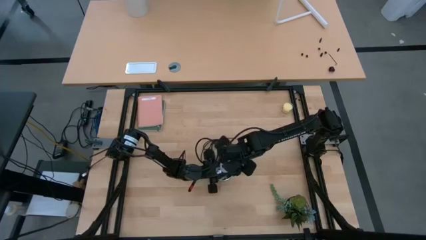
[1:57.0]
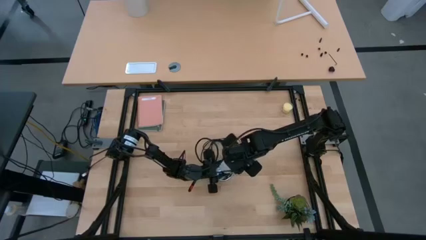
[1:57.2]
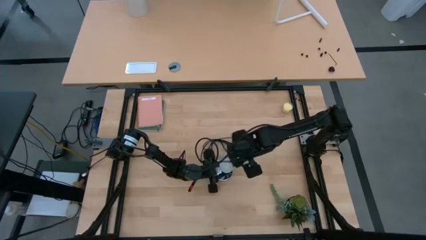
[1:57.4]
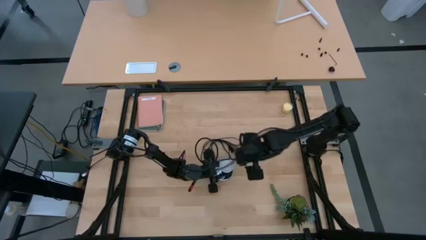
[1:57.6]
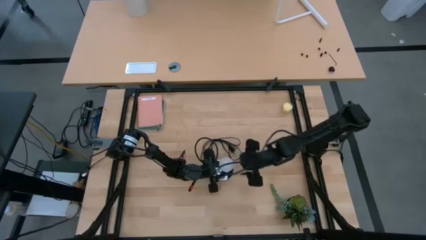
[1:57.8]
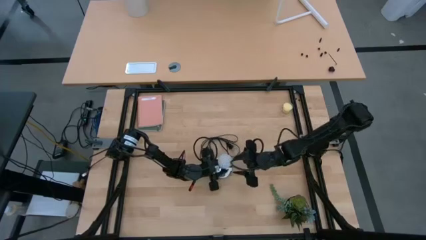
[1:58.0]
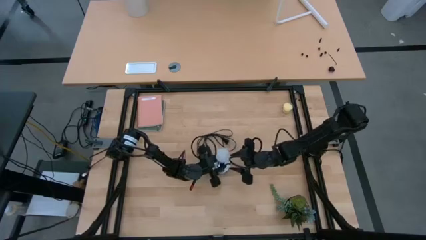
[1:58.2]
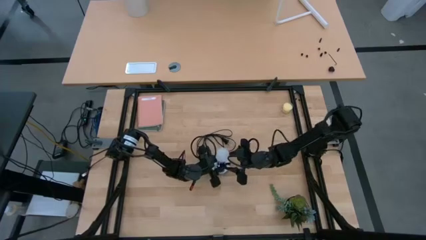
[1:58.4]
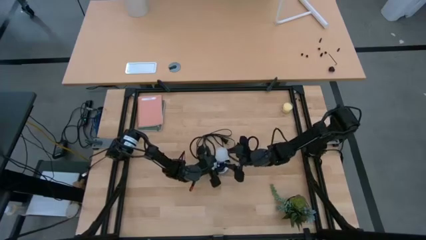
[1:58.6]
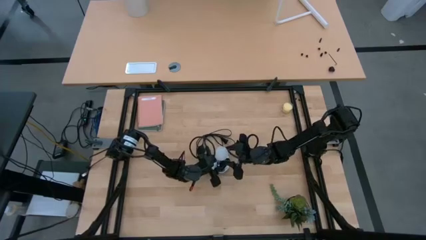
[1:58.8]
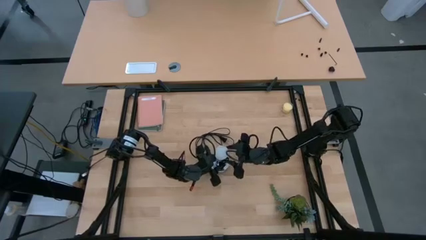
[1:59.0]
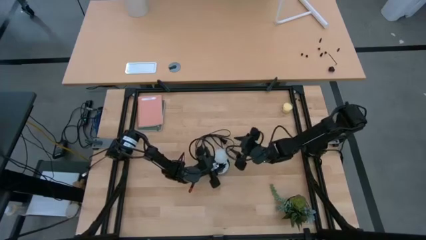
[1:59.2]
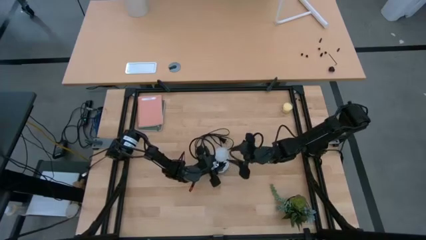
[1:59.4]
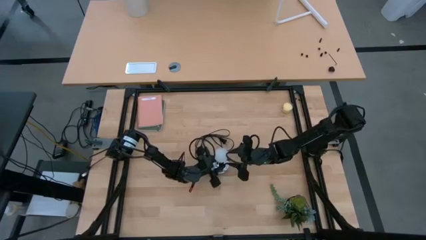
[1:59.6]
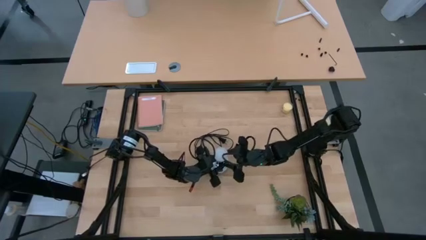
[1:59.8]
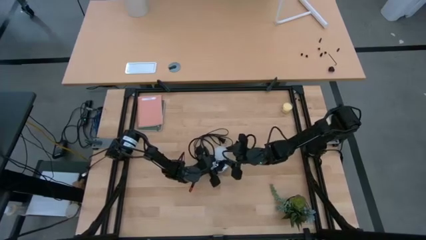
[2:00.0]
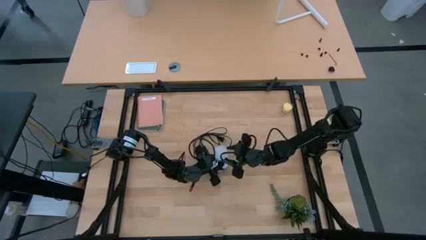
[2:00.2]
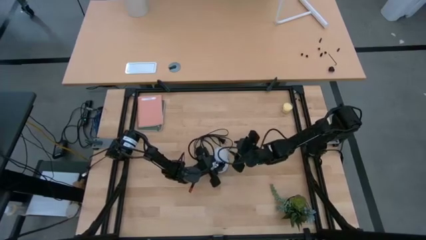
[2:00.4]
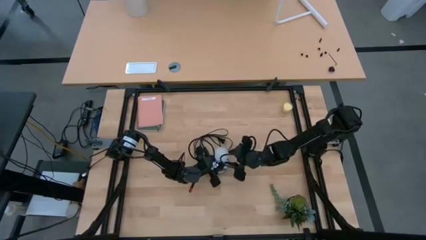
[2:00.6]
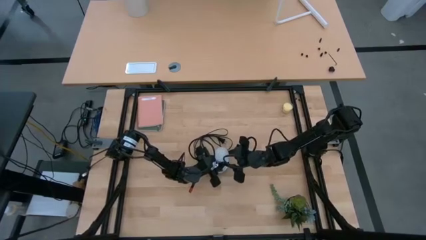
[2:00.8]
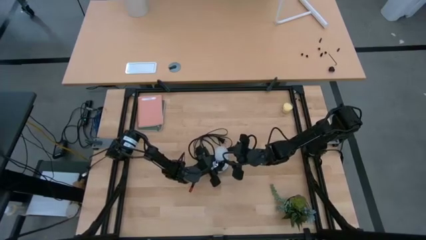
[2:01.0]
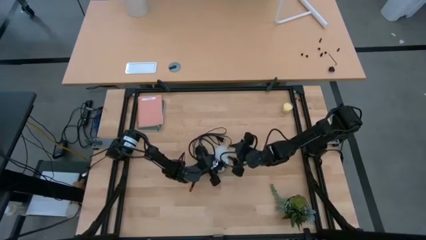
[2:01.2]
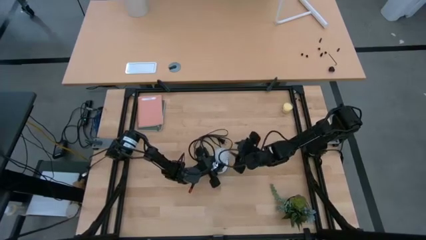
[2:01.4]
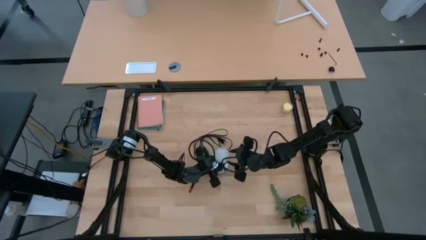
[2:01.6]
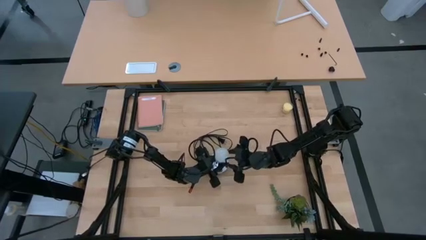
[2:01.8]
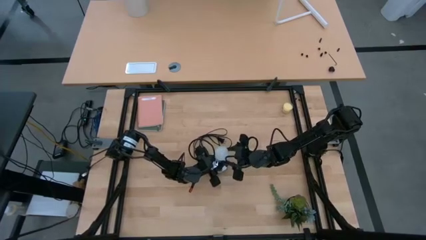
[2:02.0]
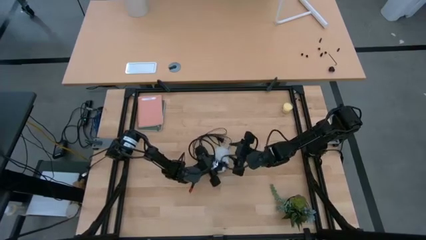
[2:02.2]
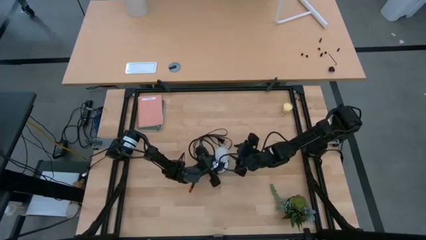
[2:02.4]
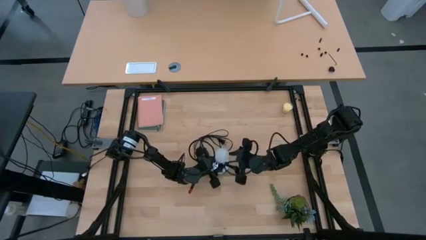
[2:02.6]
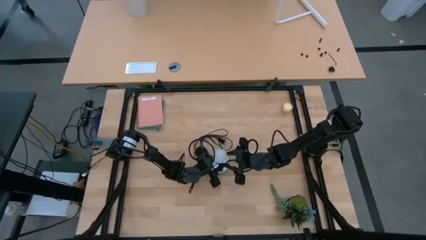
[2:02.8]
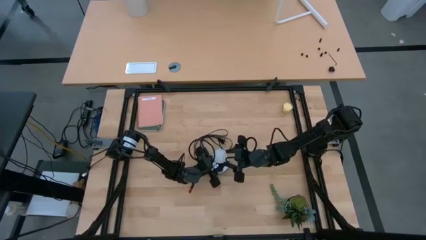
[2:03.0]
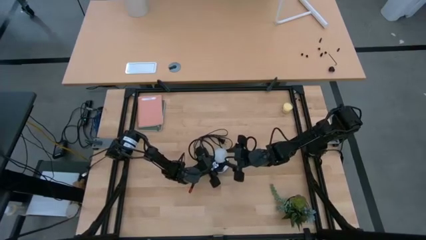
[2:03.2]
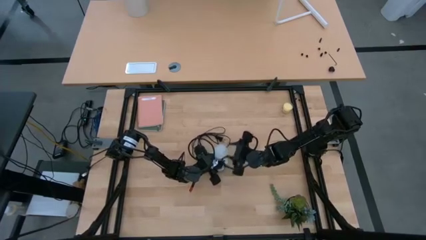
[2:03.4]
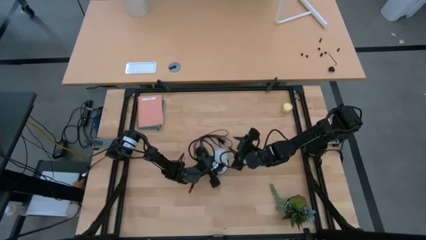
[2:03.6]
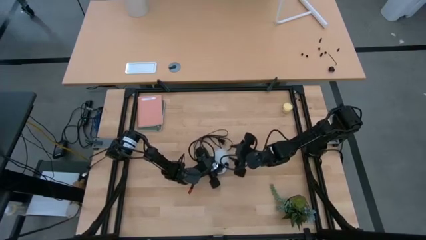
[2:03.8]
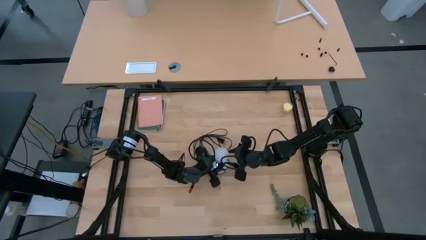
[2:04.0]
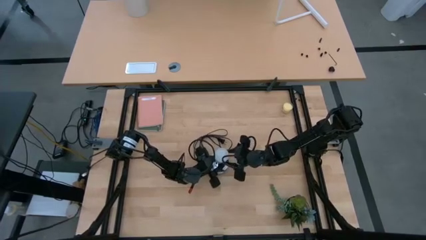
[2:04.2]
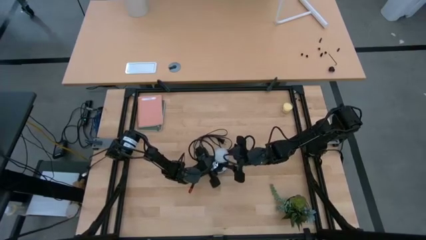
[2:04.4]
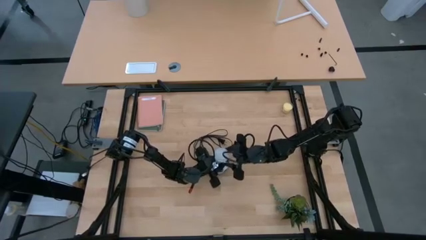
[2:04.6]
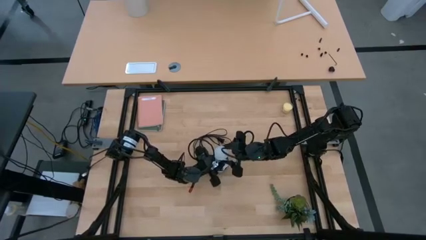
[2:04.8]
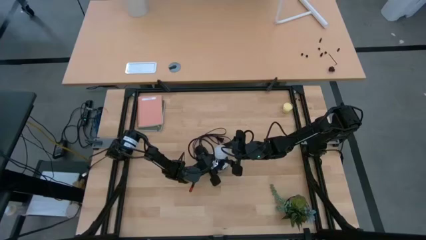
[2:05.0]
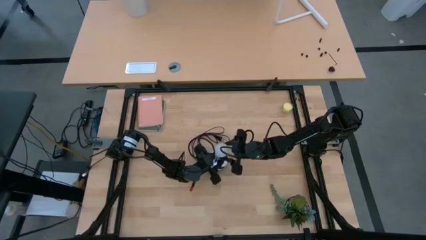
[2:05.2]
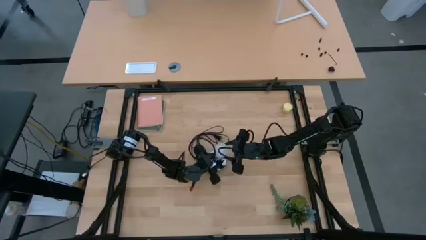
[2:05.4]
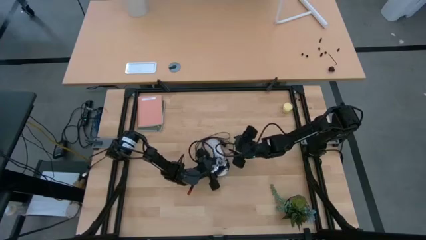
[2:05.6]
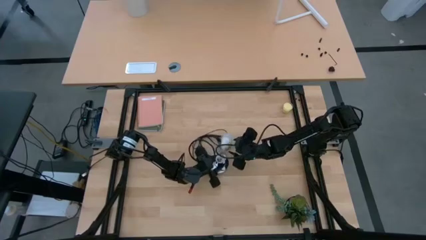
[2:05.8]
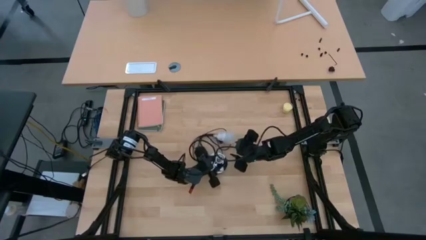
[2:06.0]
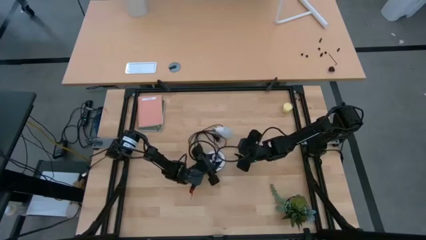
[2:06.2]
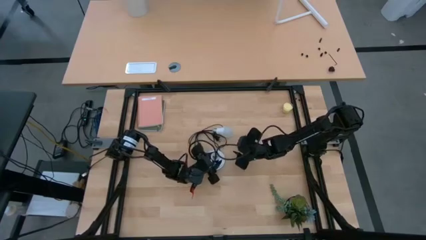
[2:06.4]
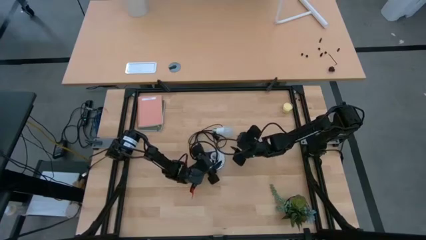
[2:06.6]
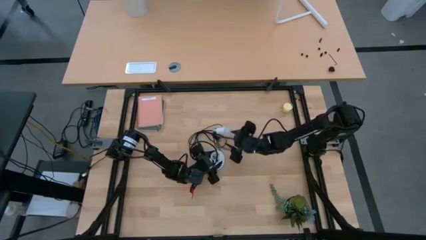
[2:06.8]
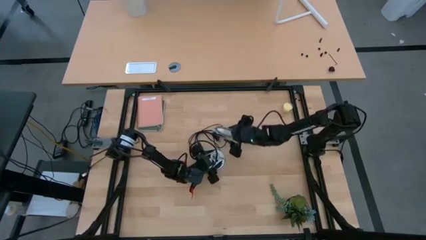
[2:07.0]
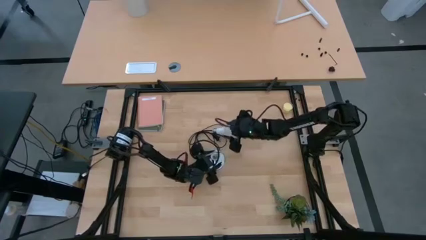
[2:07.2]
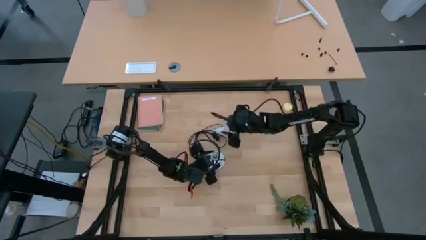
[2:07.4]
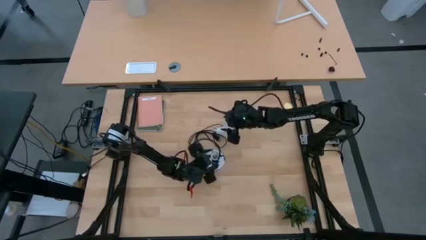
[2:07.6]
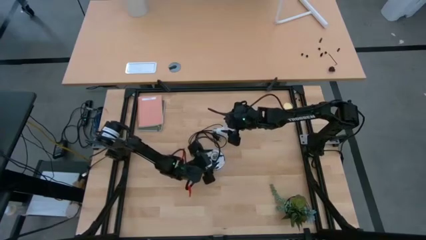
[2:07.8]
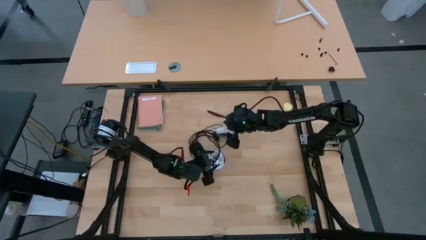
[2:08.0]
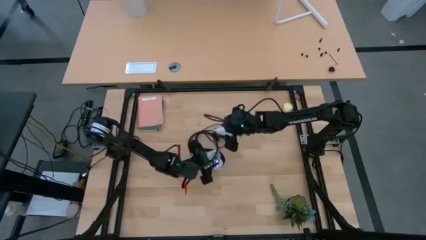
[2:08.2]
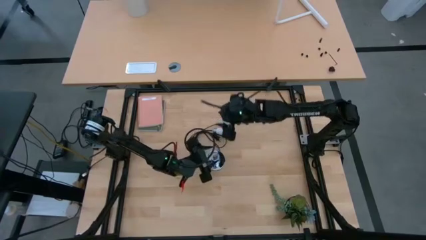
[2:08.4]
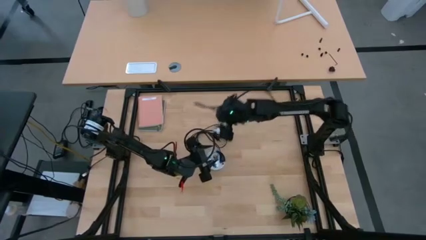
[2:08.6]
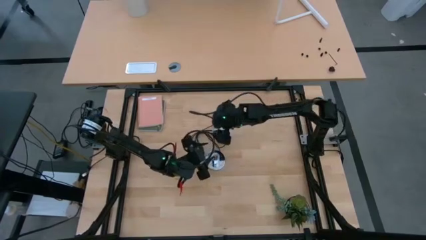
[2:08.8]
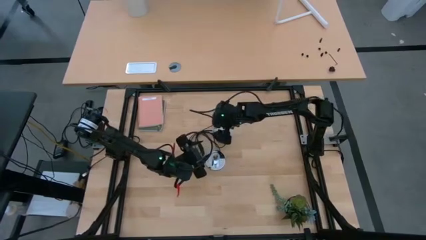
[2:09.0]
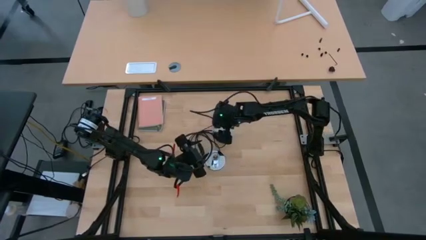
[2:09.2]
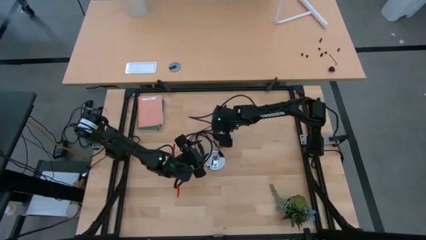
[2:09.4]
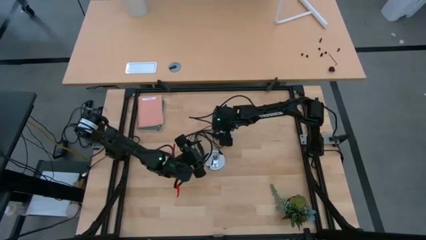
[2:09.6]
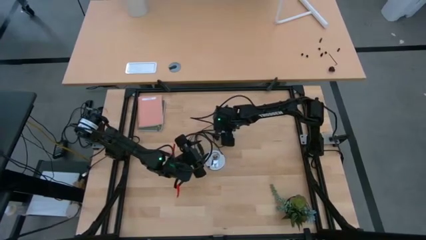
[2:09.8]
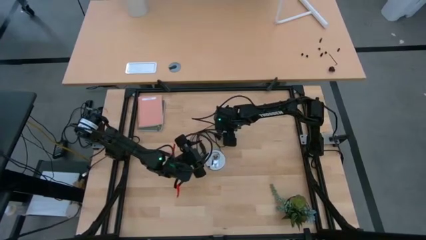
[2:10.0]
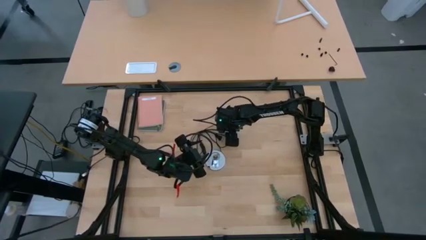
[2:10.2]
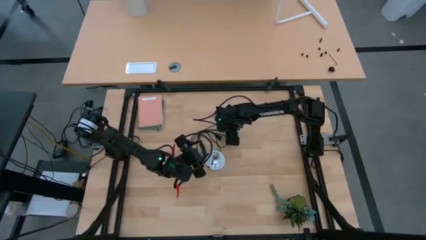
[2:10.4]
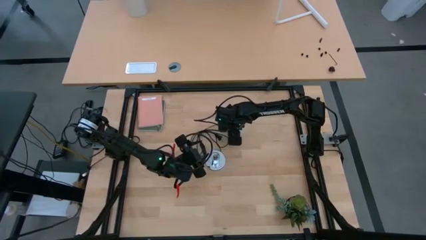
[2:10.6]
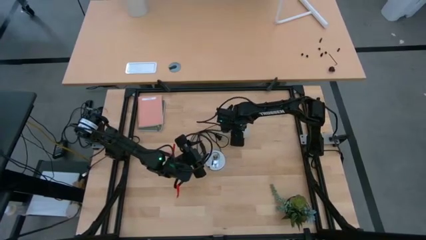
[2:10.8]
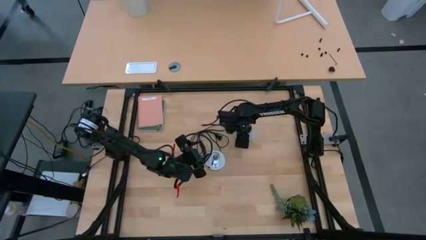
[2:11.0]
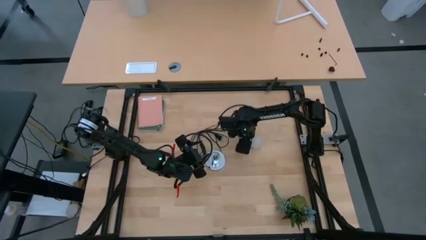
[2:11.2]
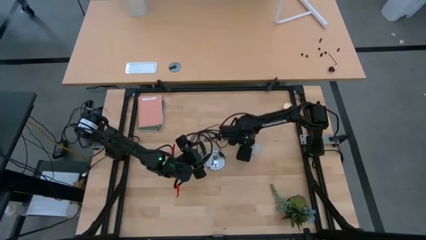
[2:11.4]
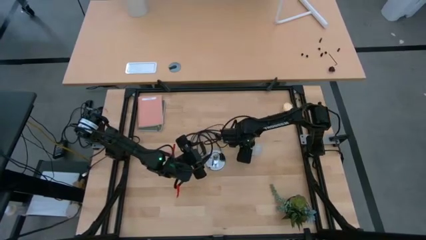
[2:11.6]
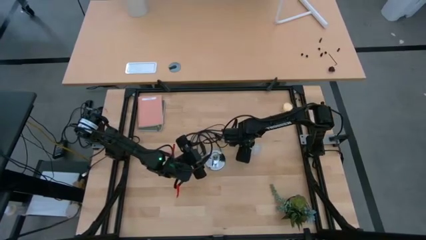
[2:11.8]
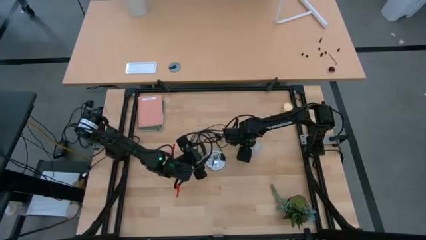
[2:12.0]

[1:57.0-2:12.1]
Task: Screw lightbulb
Remove the lightbulb from the silver lamp
